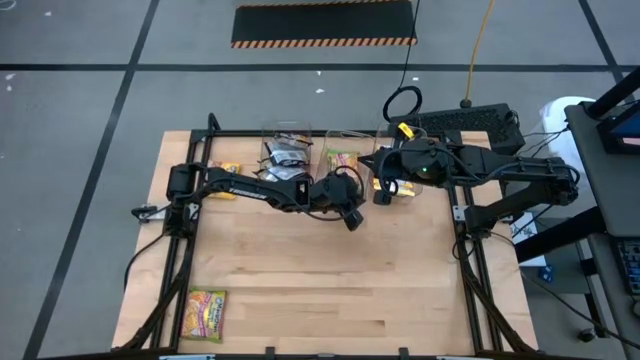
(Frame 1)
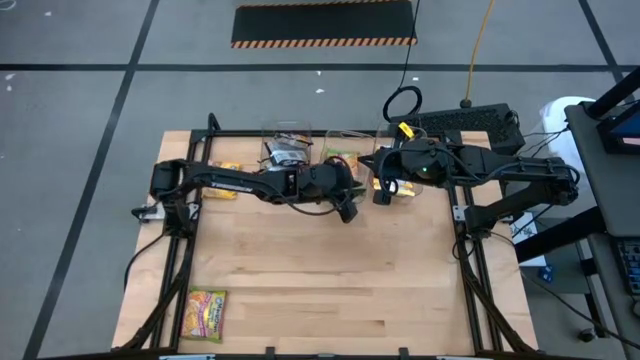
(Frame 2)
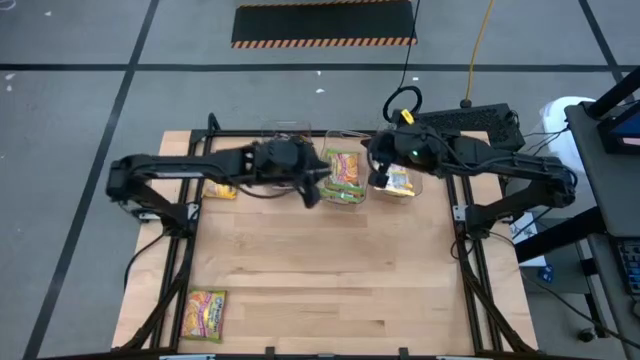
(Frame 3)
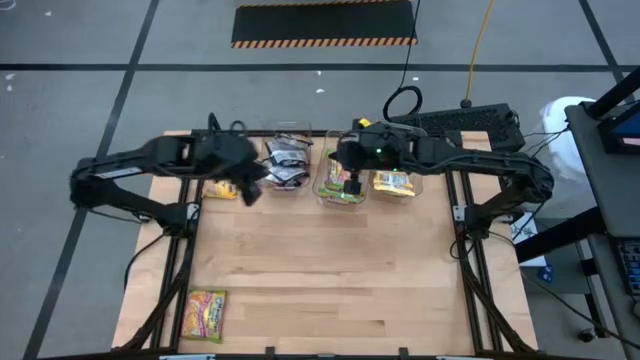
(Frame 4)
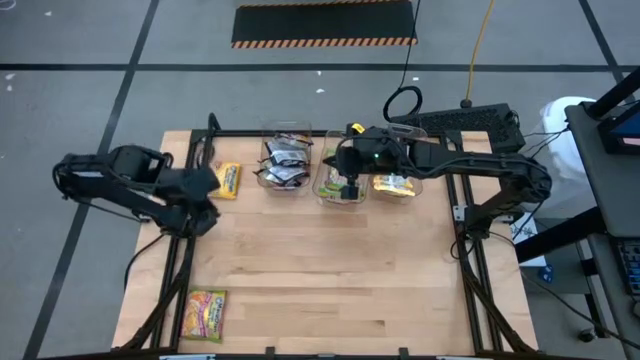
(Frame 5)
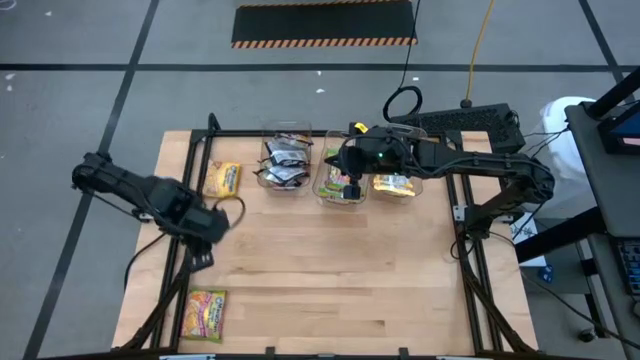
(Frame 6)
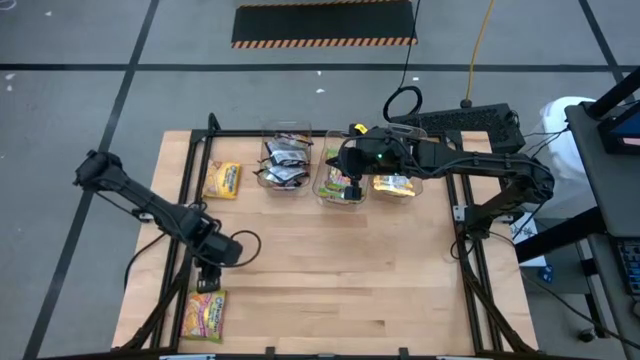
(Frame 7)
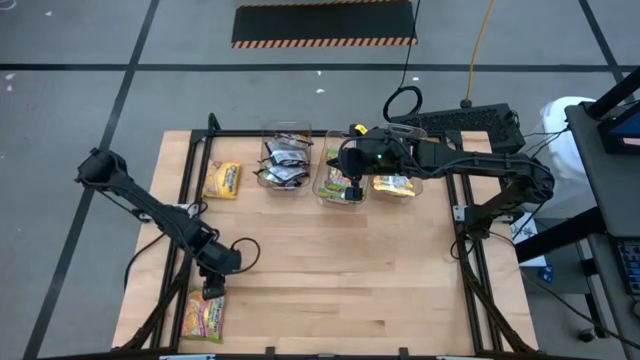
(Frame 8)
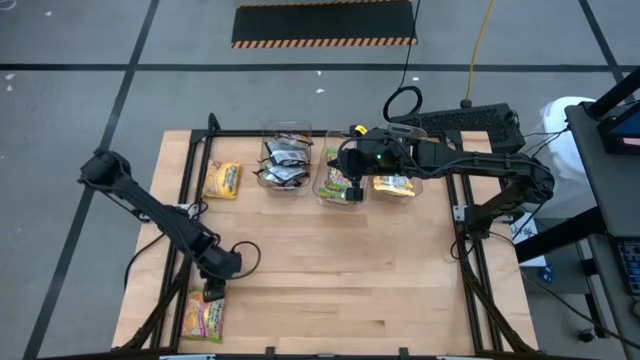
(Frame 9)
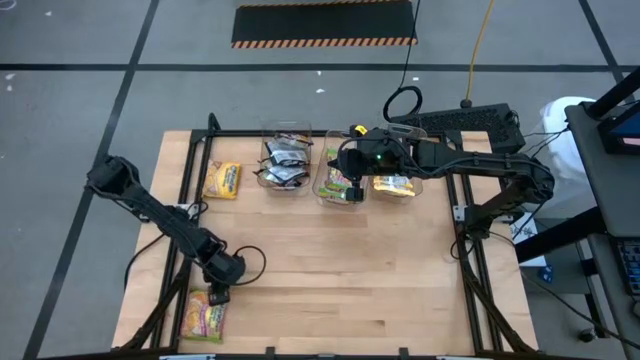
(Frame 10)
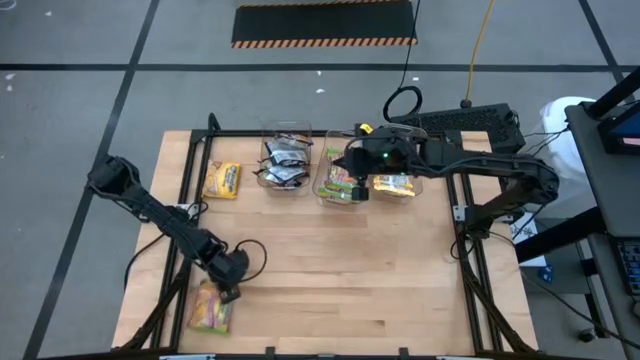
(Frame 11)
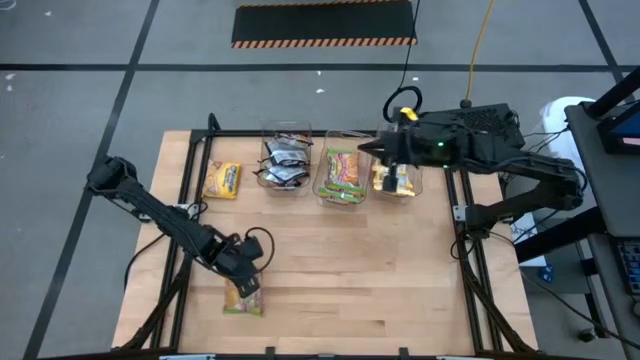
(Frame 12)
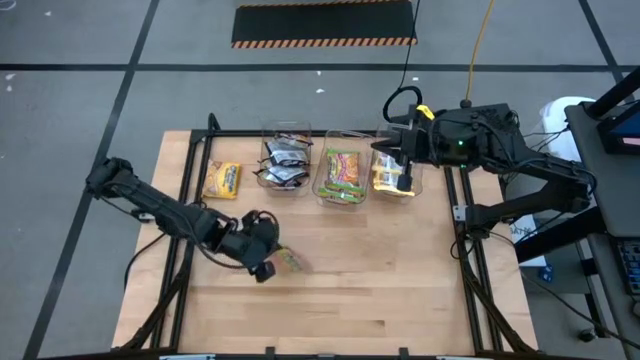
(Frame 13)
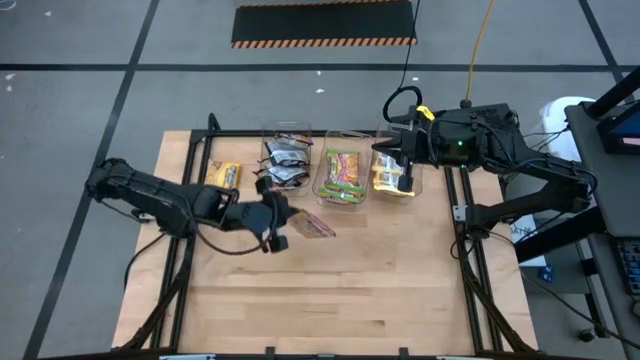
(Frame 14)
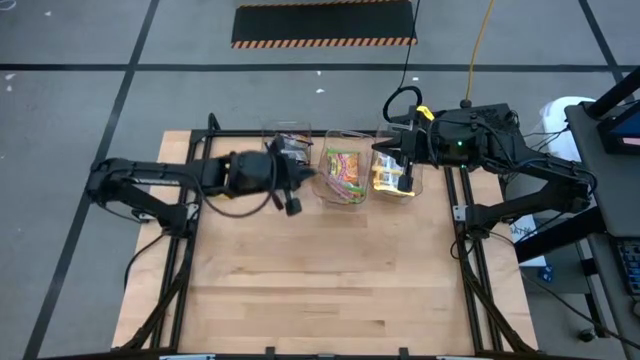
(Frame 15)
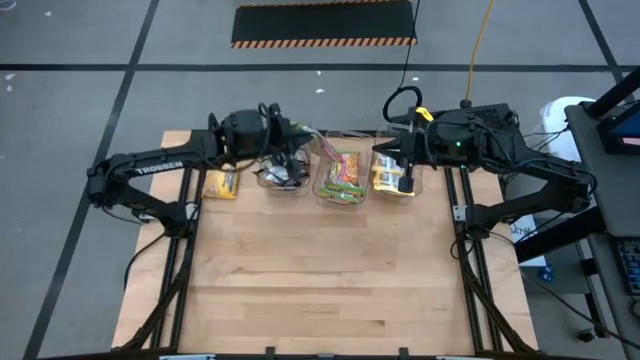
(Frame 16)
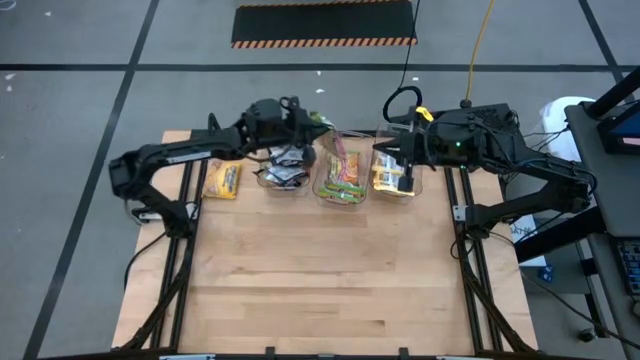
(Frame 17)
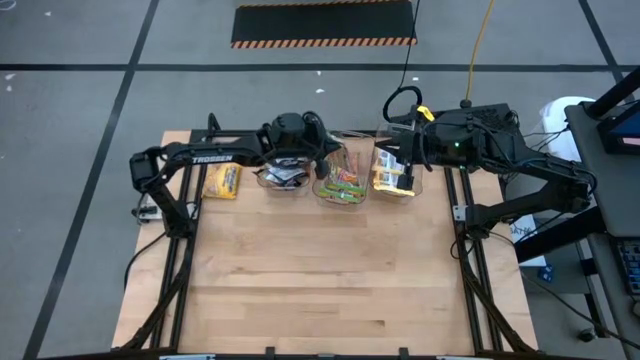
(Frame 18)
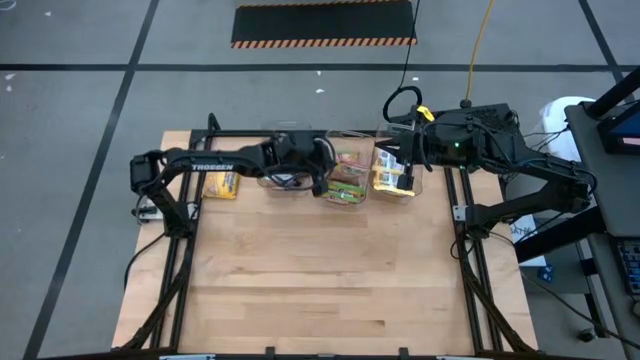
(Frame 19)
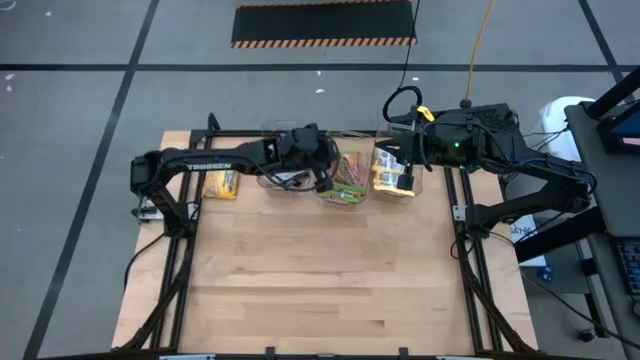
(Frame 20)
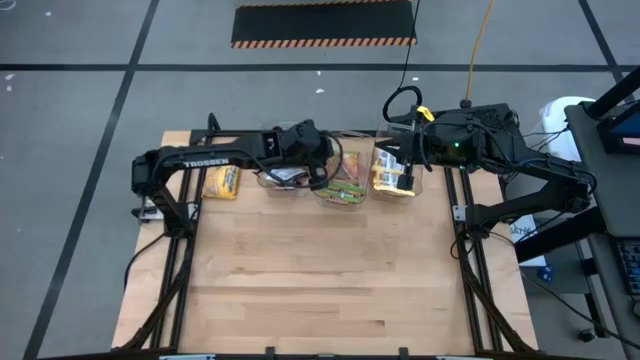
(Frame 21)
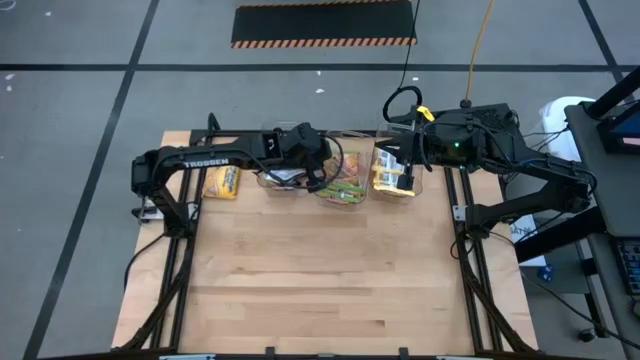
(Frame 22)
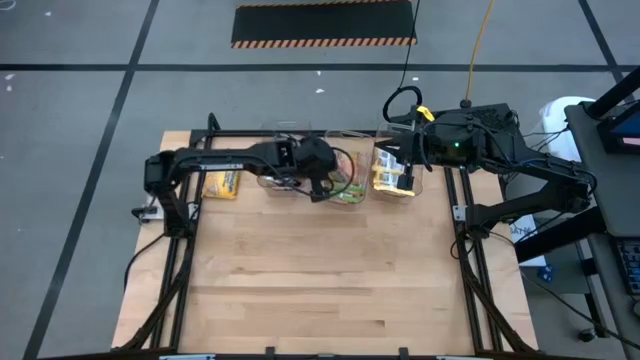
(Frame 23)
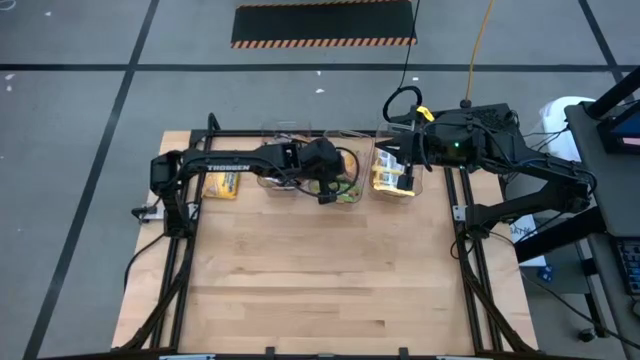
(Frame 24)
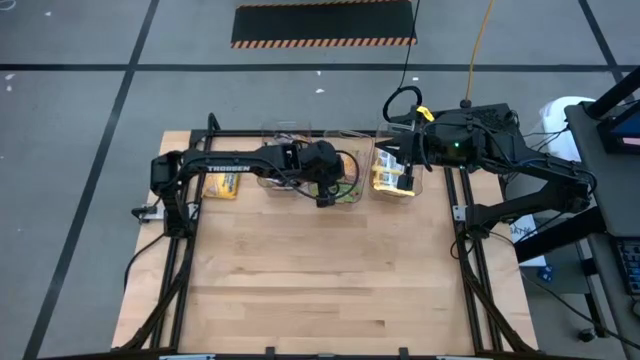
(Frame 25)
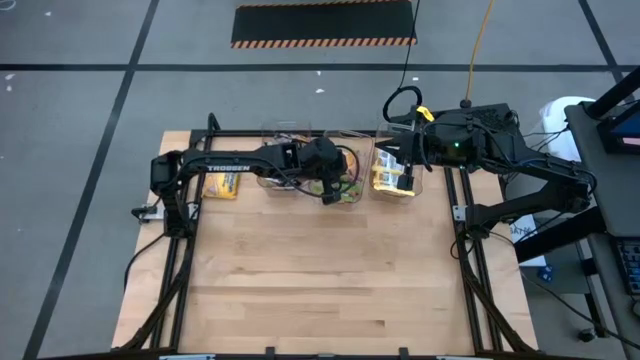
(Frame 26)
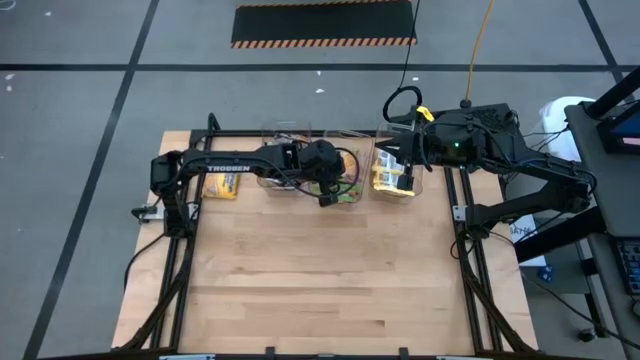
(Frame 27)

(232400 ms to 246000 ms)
Task: Sort Maruchan noodles
Put the green noodle pack into the middle transparent bin
